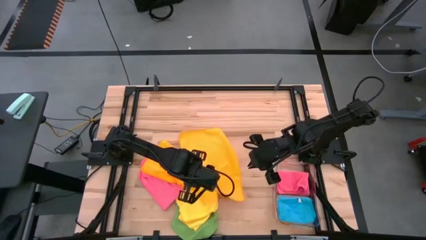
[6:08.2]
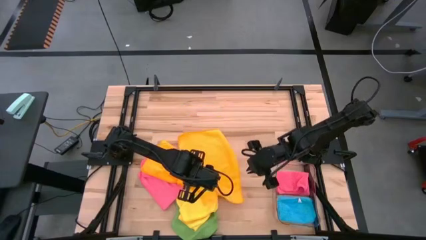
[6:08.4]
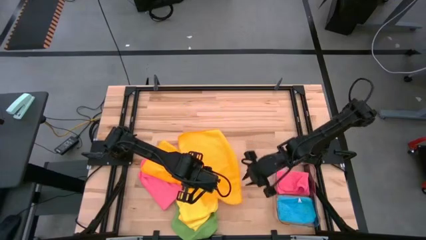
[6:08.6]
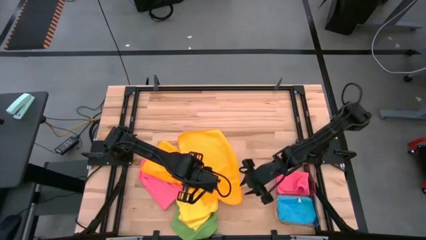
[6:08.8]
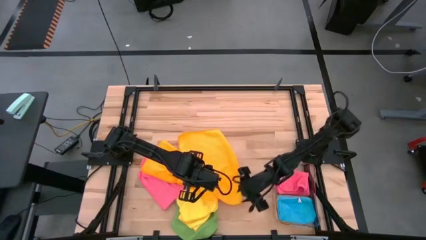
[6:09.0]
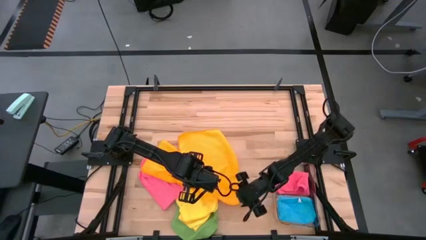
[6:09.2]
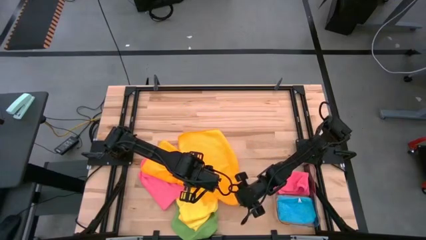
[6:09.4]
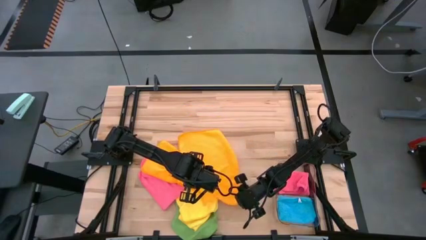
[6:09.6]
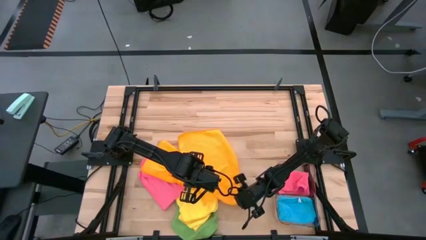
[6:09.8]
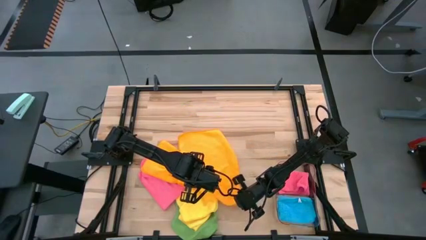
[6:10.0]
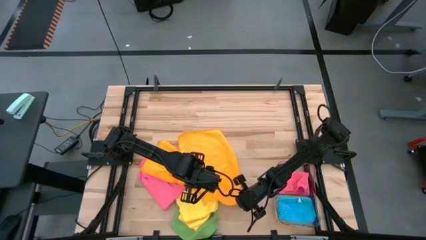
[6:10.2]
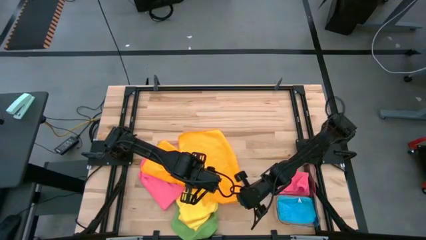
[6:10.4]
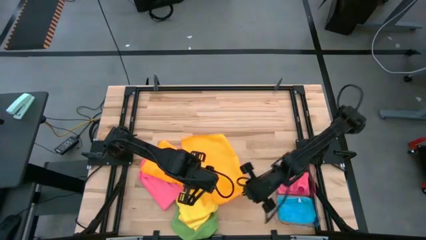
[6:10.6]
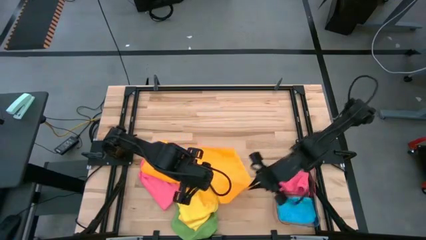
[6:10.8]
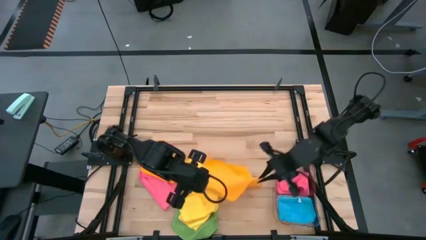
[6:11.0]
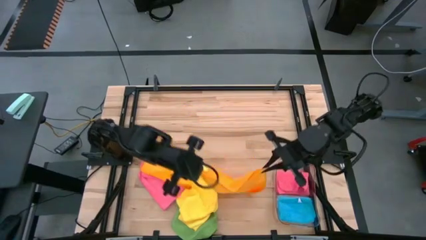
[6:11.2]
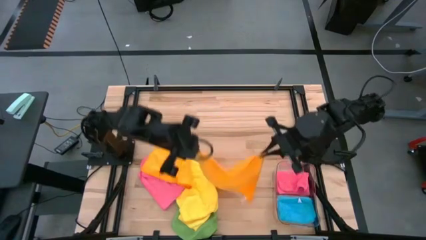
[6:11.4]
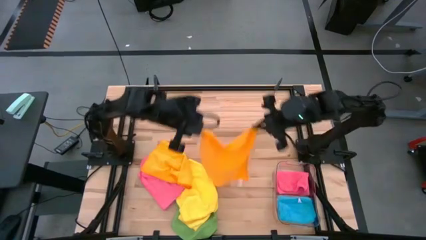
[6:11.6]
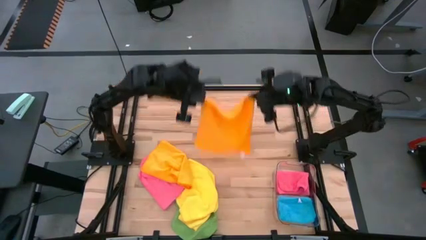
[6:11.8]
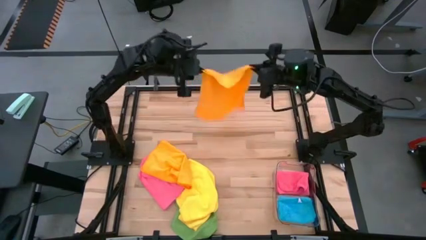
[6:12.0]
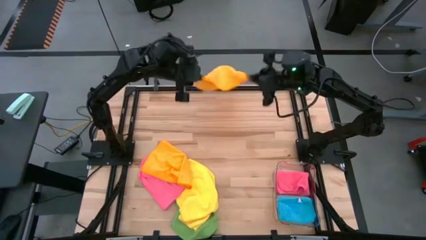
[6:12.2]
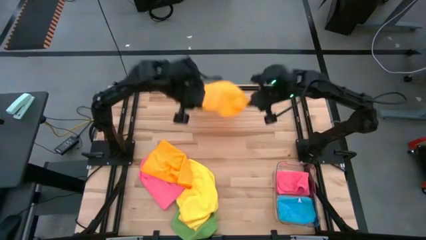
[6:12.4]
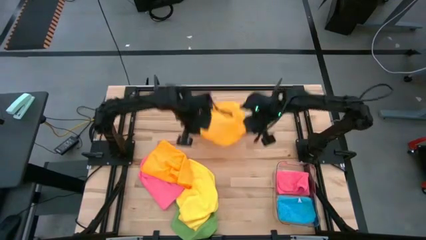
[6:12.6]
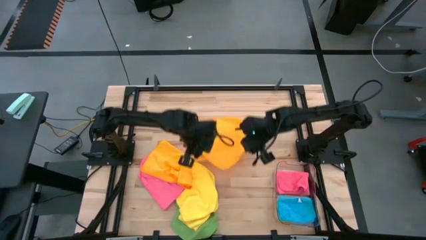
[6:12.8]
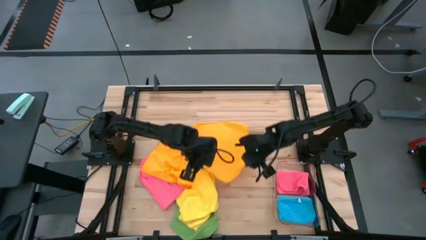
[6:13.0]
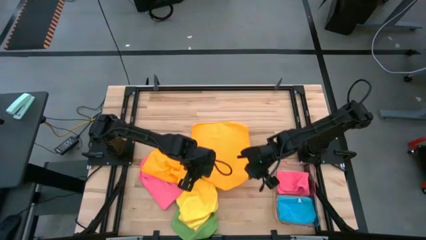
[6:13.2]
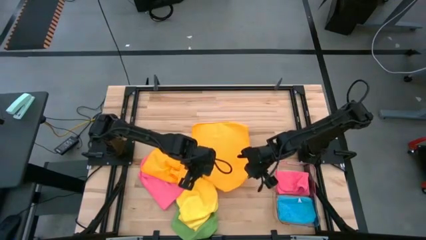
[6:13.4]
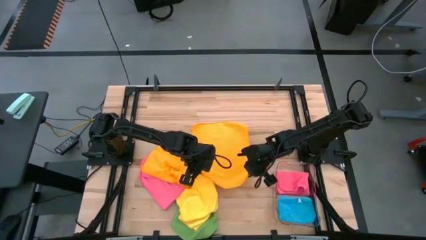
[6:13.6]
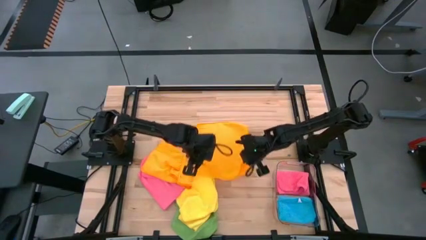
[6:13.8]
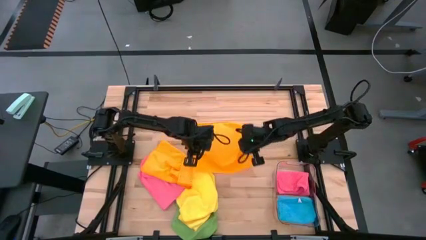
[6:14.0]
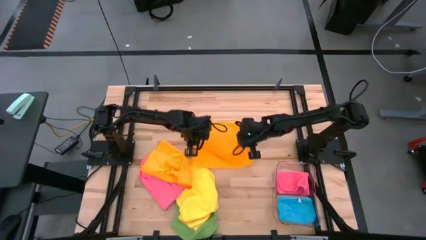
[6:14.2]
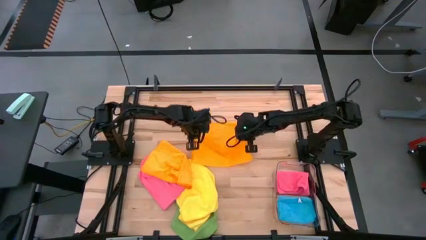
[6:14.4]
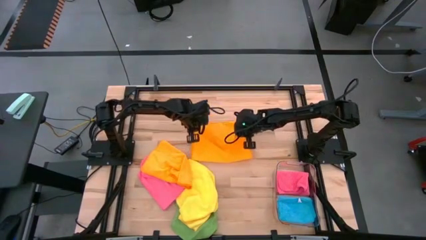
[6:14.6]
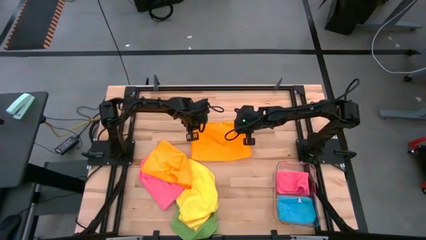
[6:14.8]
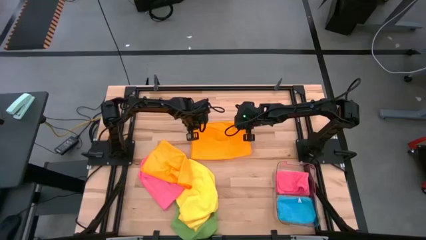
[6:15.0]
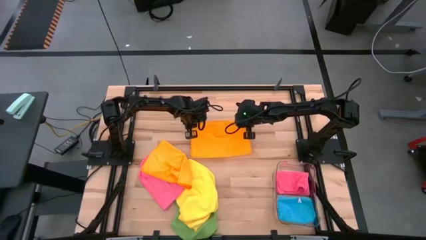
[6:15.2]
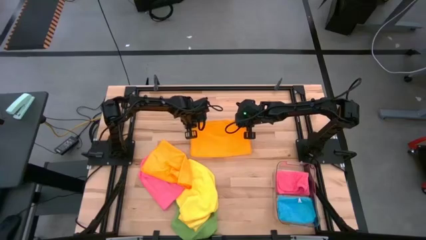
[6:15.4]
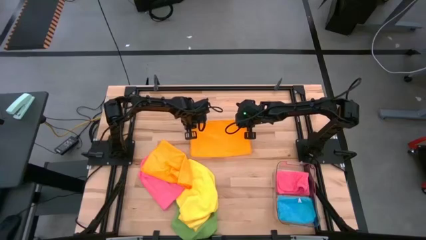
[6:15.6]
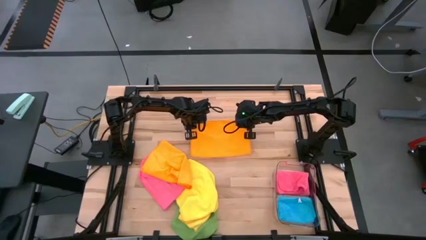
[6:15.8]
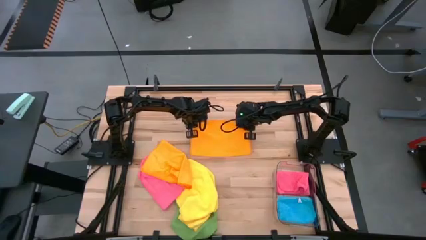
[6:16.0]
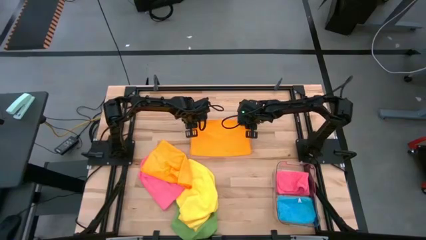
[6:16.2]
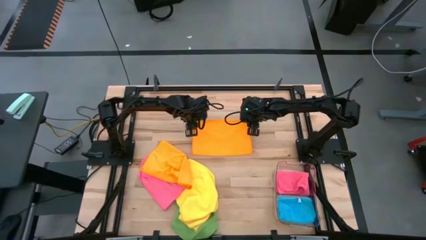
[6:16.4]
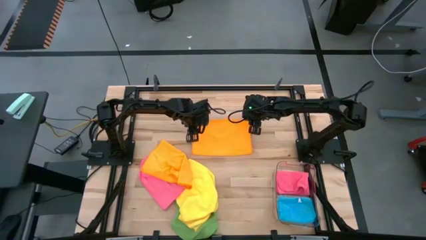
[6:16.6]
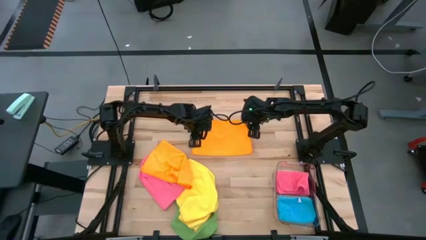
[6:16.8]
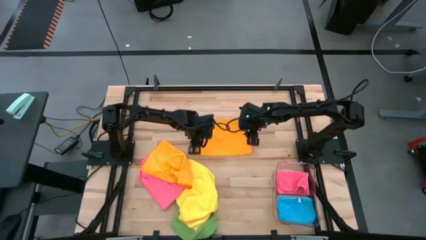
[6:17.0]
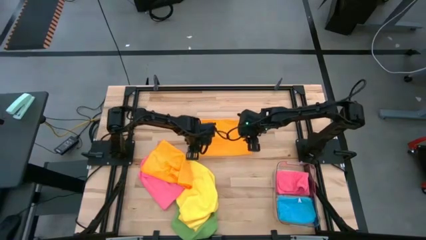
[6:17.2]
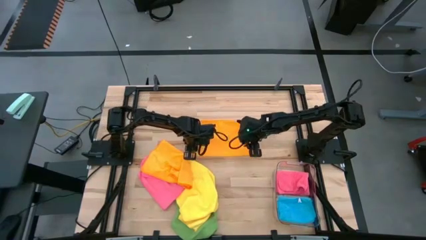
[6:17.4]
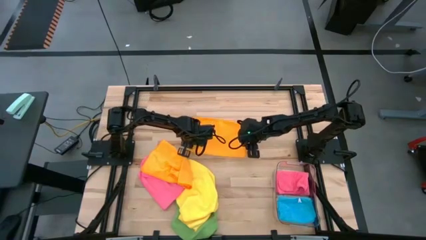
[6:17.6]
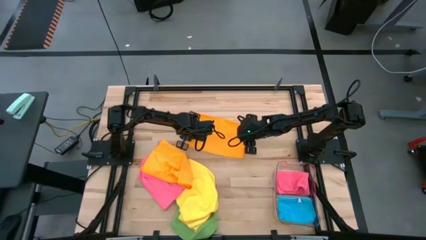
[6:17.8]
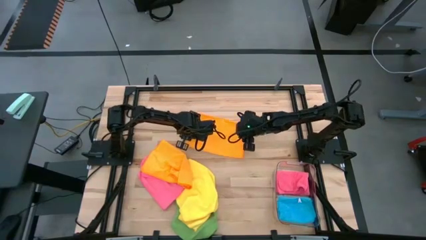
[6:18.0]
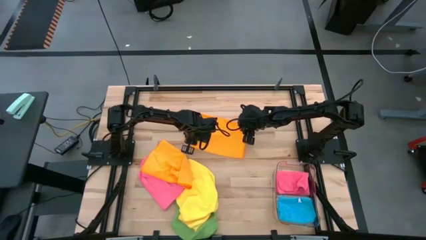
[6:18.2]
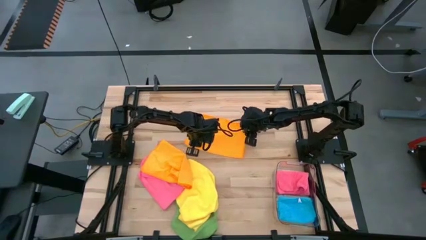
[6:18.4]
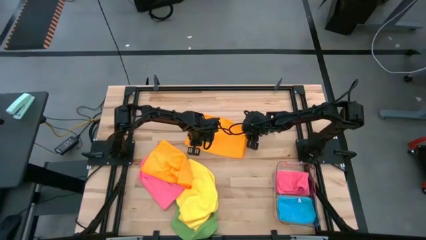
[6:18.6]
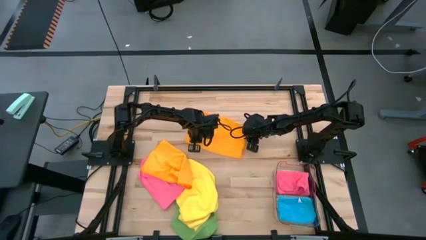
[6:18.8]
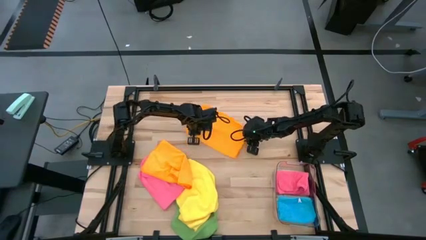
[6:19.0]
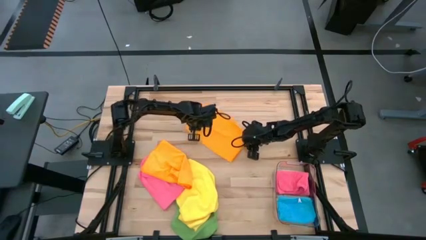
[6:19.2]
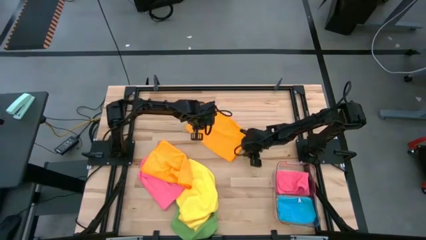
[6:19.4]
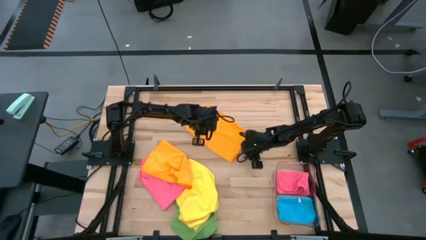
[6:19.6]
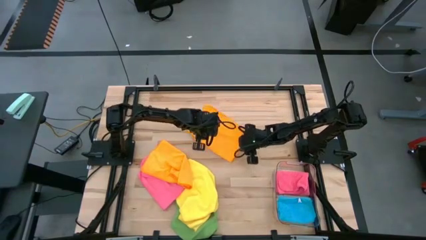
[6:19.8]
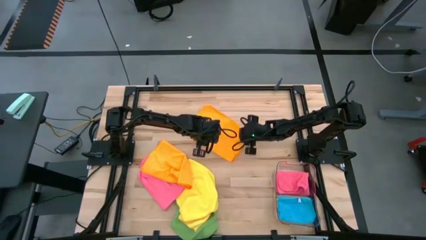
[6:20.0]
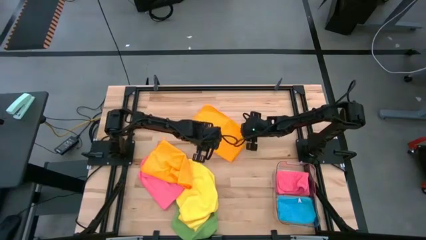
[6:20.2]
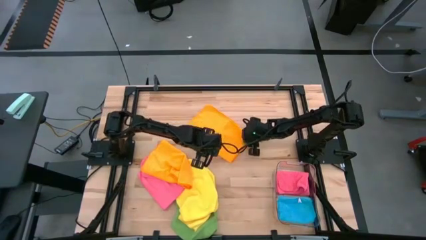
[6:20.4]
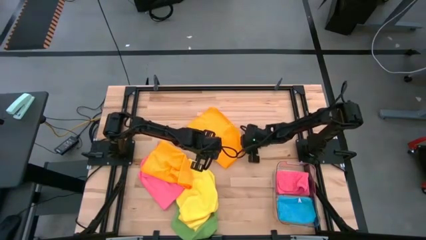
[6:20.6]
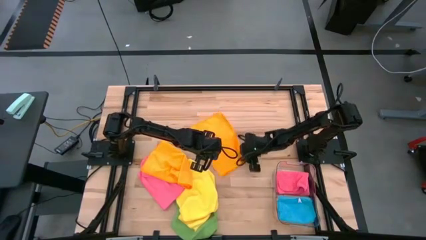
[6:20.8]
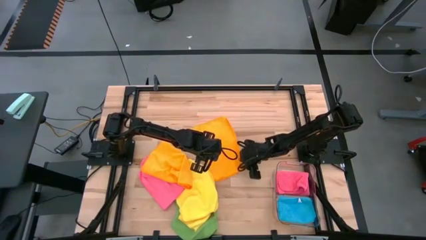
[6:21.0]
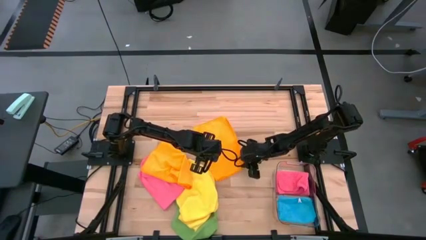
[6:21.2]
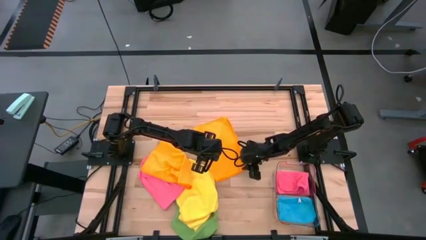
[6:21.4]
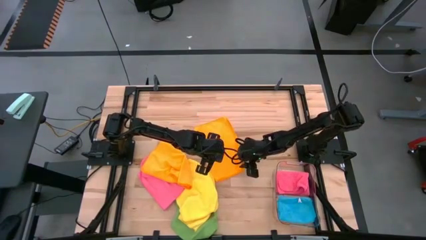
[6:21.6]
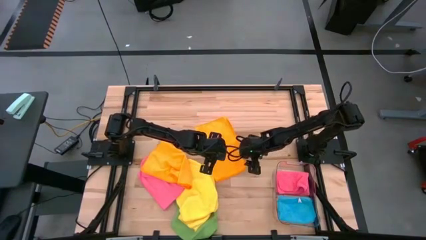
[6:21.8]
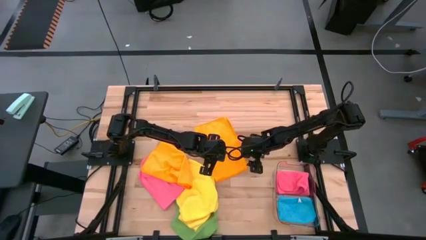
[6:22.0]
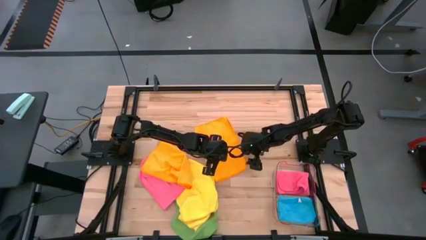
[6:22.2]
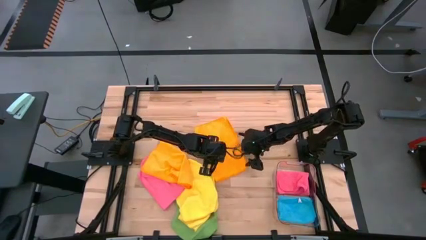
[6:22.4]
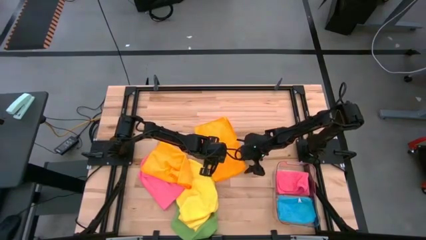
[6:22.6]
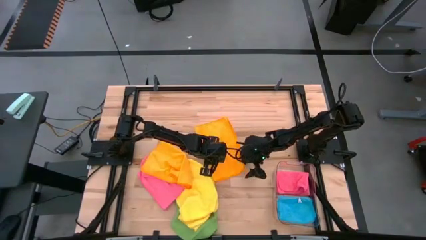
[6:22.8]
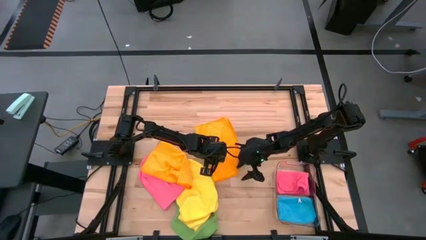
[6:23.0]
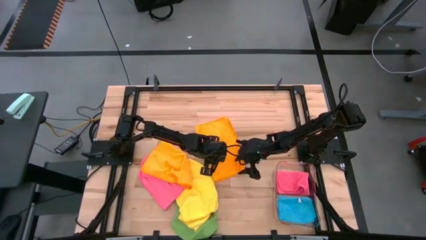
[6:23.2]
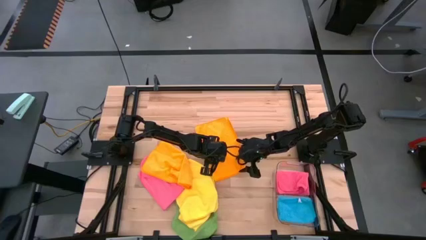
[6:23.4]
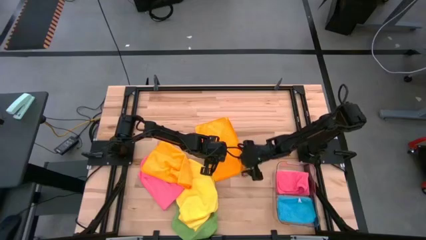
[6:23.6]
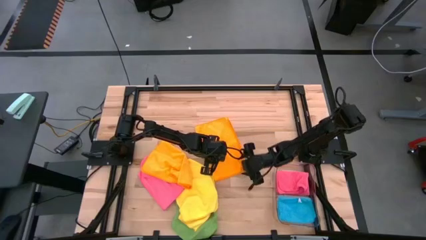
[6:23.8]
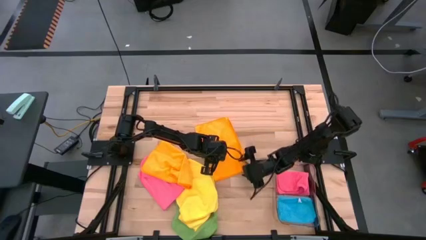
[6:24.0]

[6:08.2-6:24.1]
Task: Fold microfiber towels
Fold the orange towel
